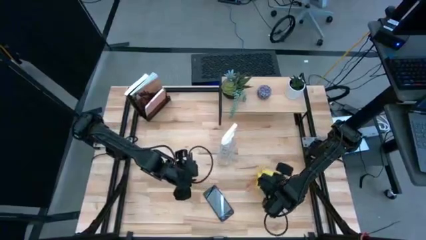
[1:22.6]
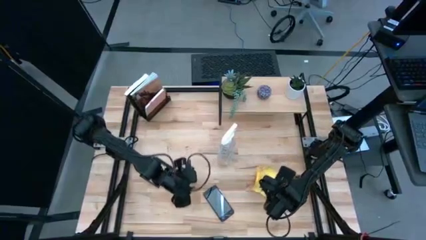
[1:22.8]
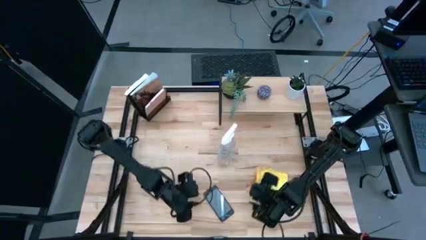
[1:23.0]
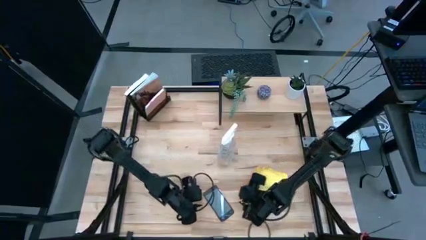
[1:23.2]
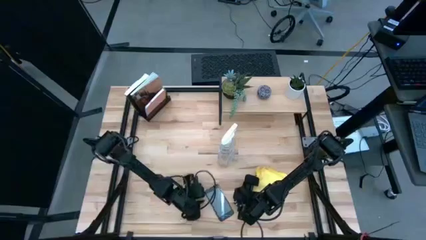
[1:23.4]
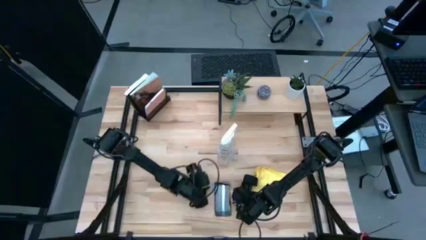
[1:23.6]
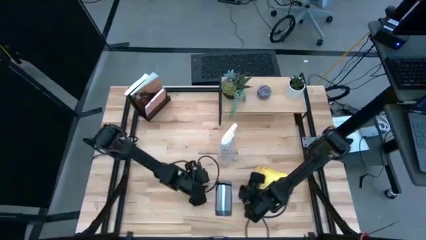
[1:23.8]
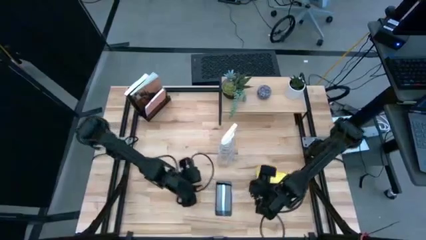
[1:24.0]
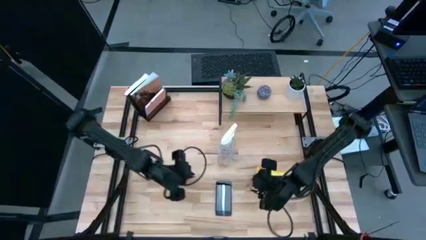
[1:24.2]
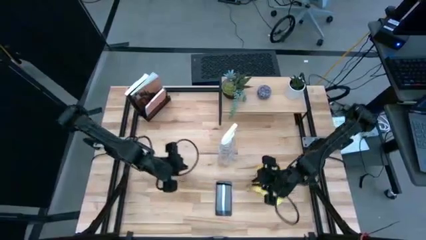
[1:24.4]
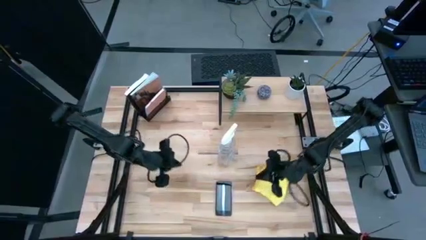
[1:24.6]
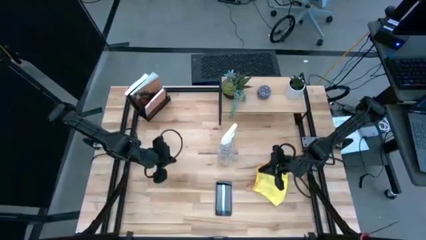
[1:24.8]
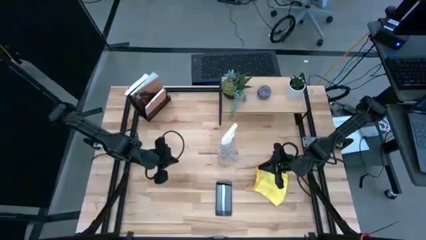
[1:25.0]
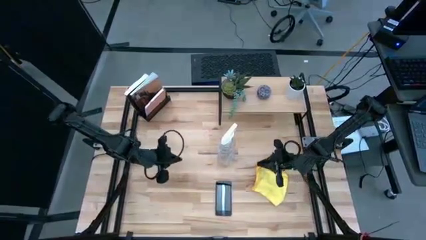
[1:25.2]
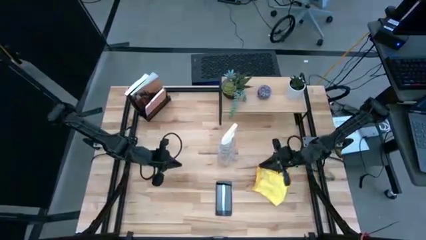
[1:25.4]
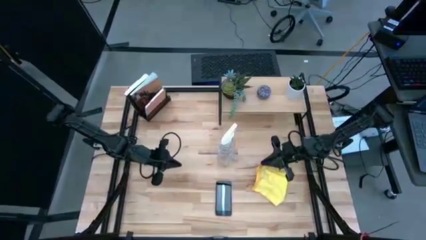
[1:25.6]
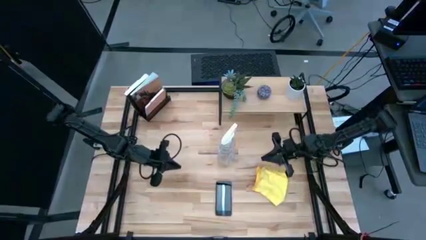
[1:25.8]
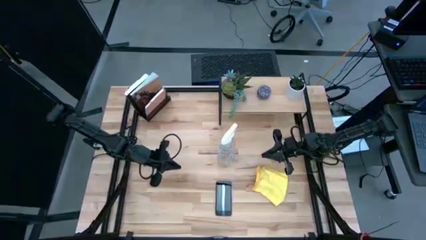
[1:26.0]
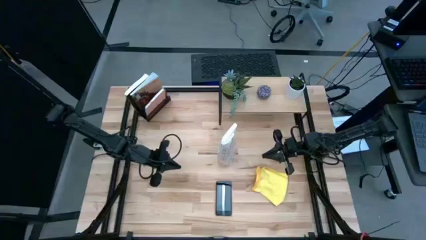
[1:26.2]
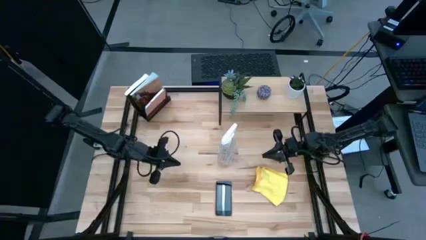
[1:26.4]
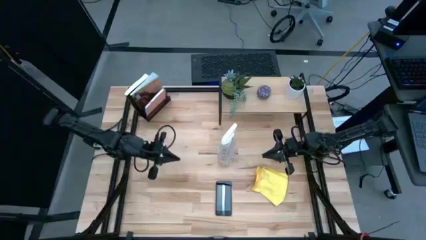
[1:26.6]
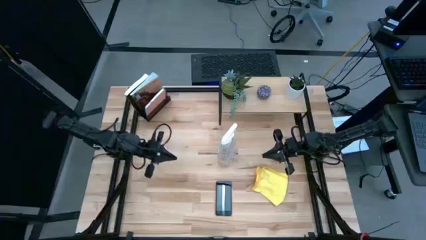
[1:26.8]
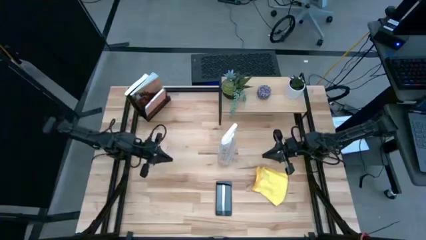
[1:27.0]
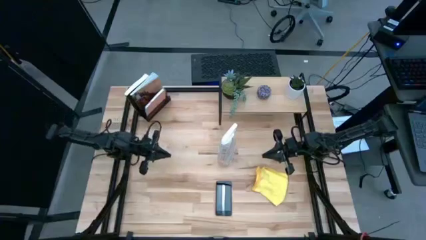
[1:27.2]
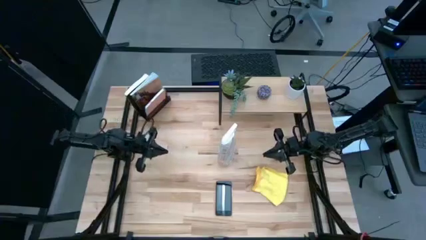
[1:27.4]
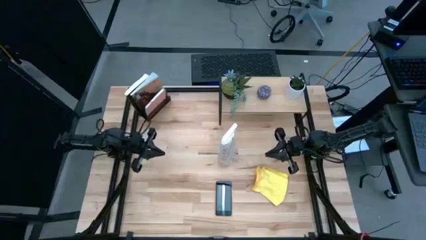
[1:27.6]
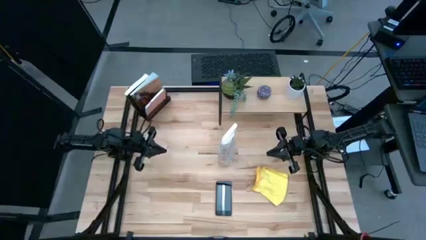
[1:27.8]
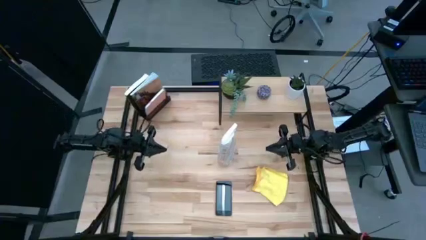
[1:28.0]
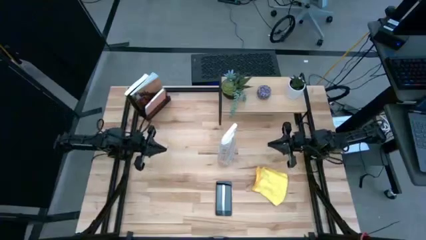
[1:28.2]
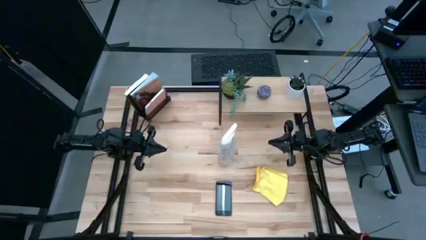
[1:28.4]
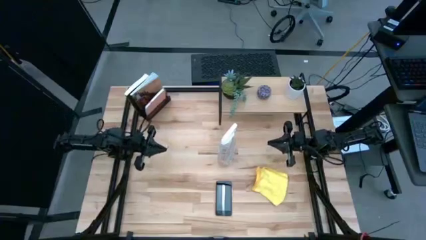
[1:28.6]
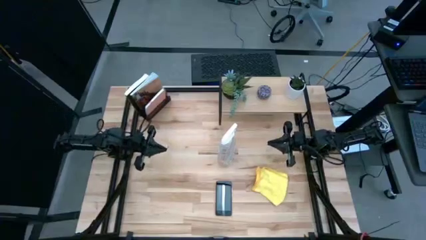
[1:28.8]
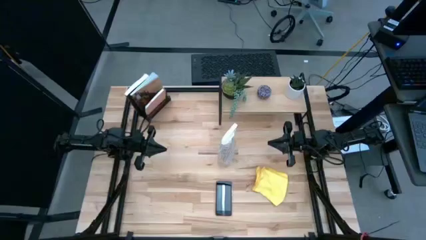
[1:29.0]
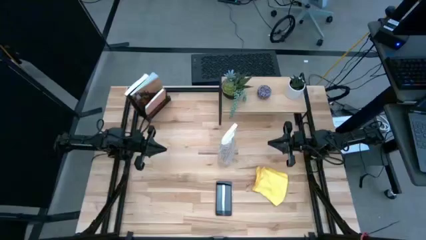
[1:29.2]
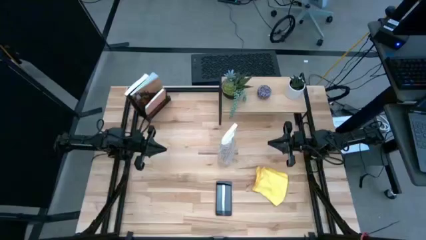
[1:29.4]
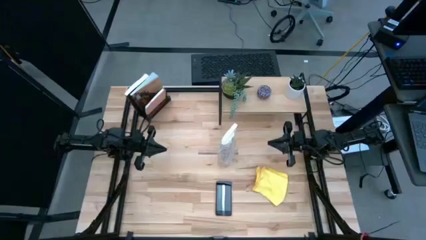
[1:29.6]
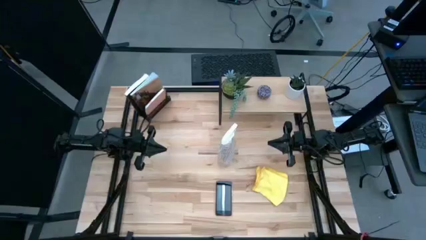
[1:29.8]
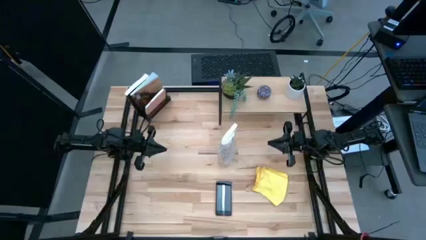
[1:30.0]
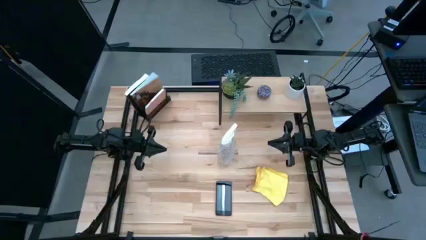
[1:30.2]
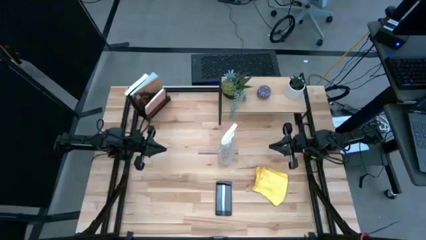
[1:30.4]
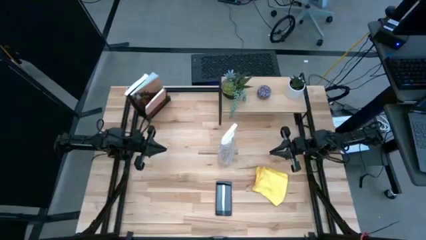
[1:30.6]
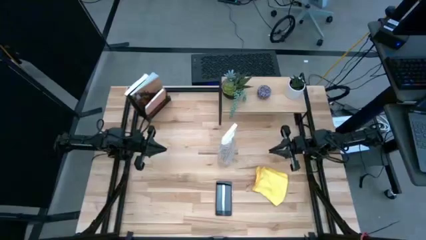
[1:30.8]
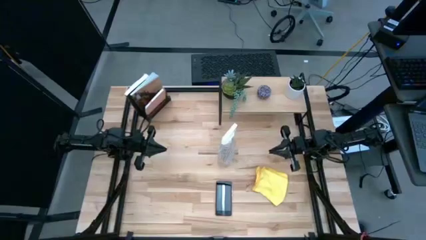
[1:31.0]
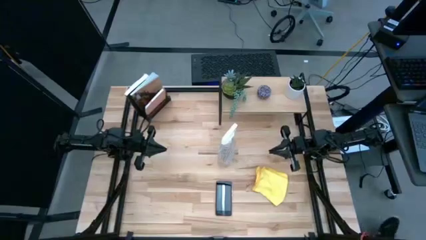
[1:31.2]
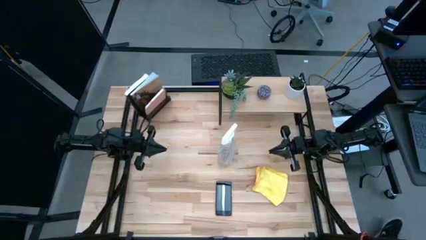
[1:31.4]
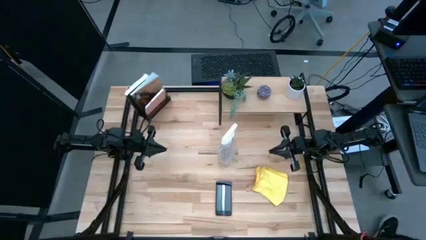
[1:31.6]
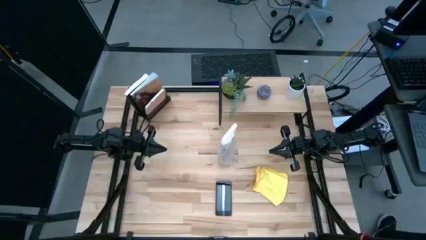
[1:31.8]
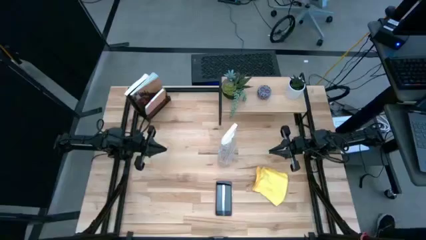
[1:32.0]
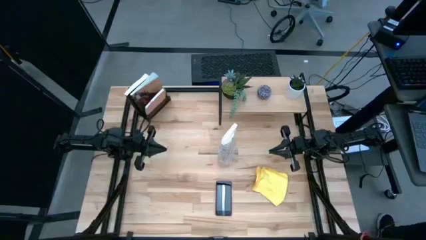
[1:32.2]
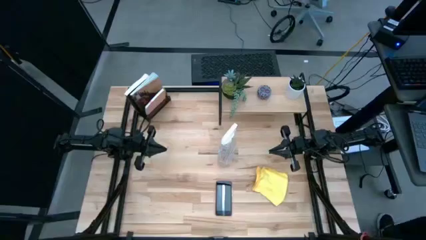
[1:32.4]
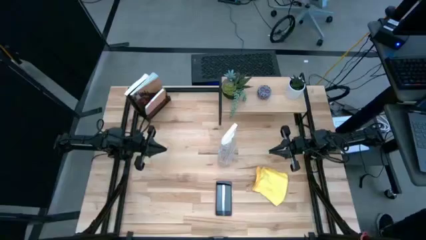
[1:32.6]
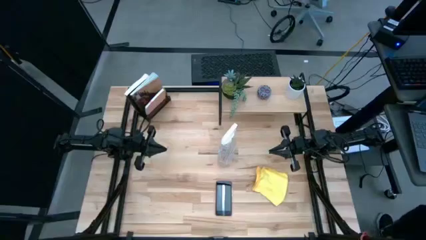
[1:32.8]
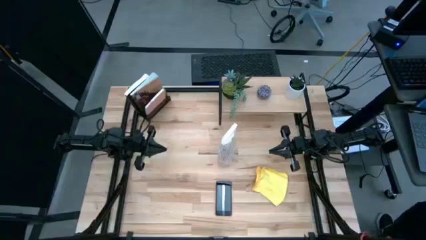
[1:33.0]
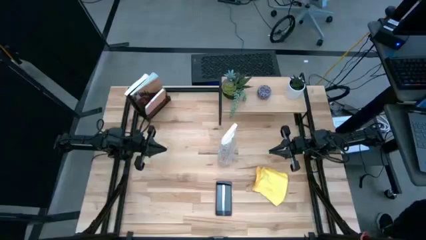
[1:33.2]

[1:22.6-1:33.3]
Task: Apply microfiber cloth
Return to Home Position
